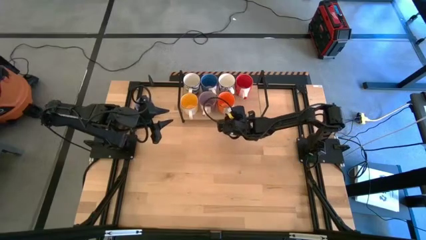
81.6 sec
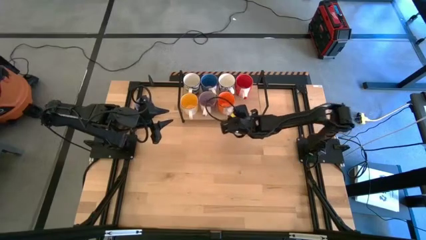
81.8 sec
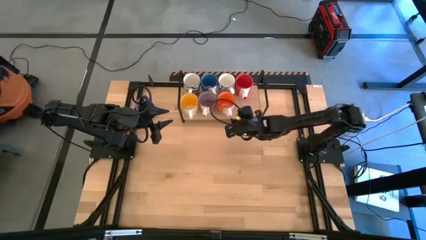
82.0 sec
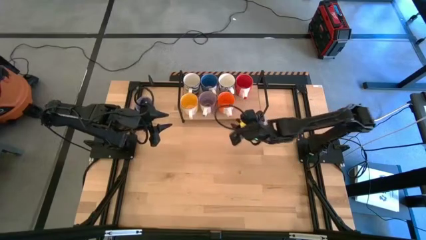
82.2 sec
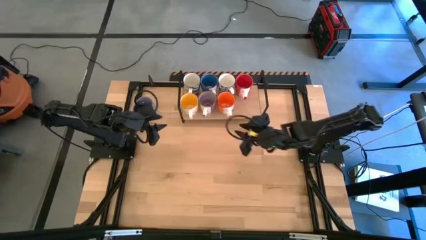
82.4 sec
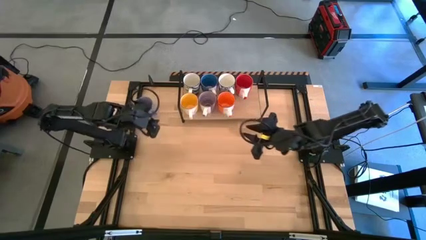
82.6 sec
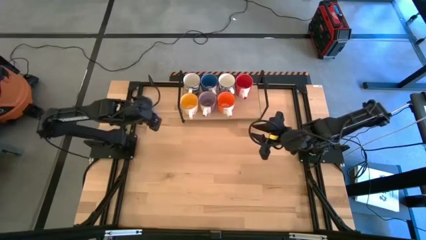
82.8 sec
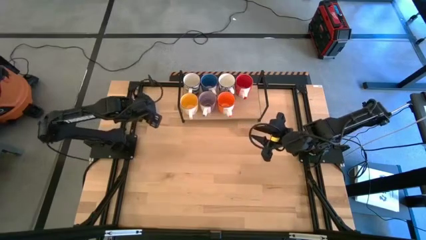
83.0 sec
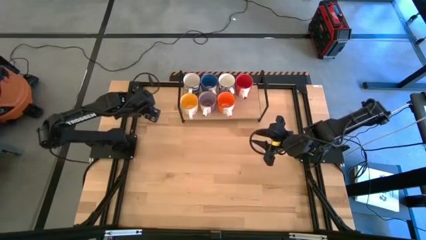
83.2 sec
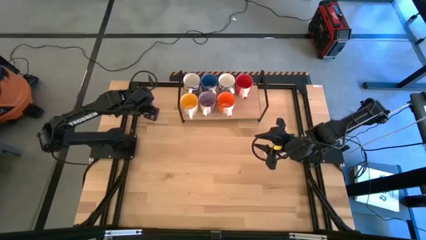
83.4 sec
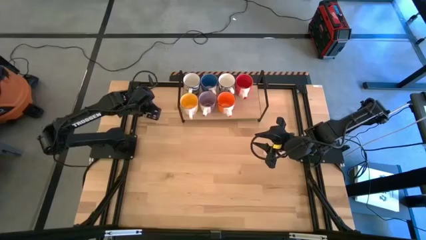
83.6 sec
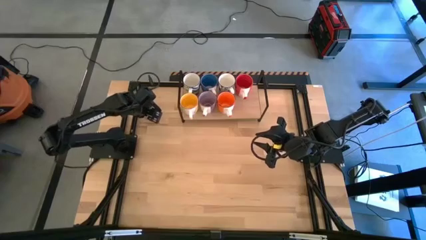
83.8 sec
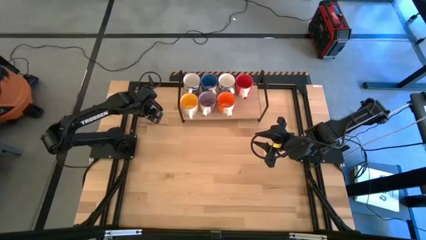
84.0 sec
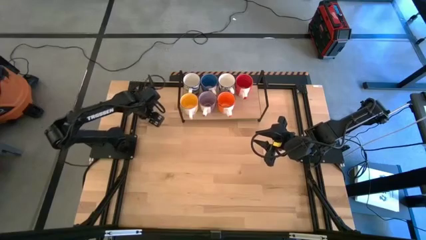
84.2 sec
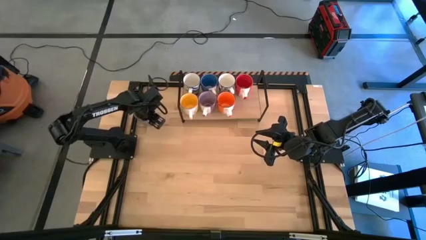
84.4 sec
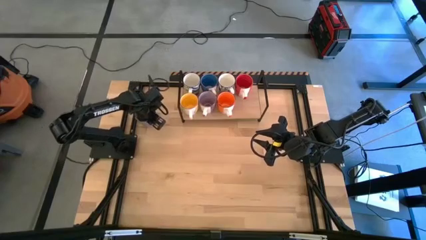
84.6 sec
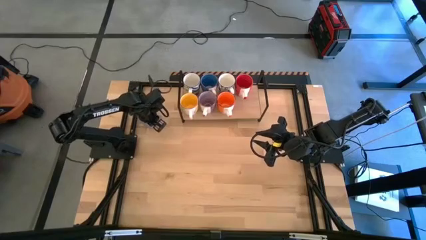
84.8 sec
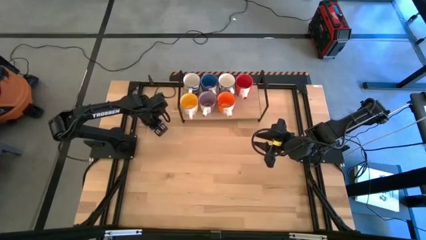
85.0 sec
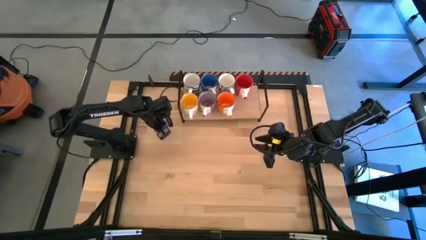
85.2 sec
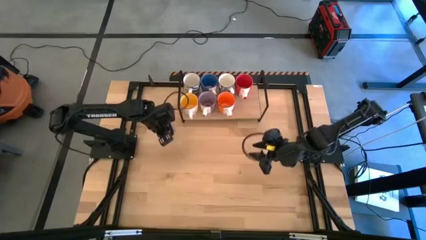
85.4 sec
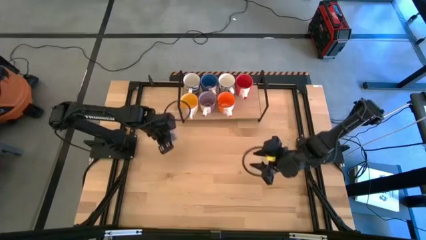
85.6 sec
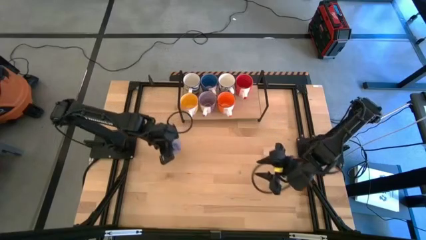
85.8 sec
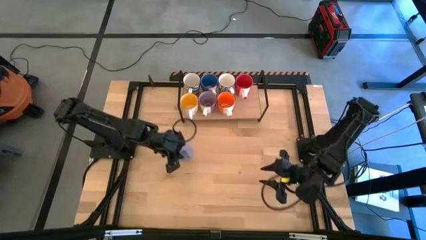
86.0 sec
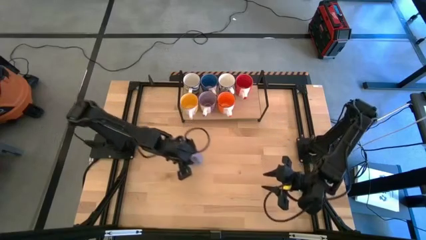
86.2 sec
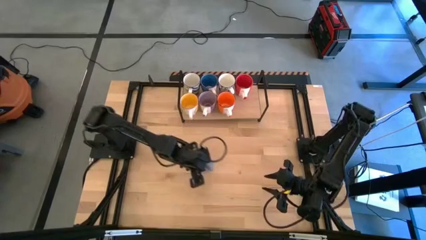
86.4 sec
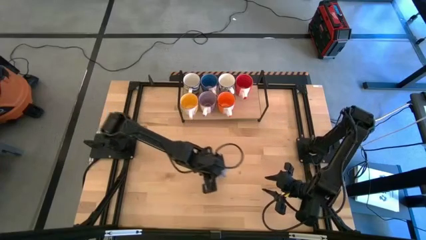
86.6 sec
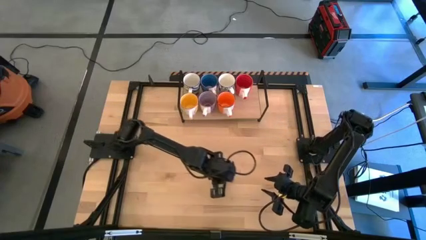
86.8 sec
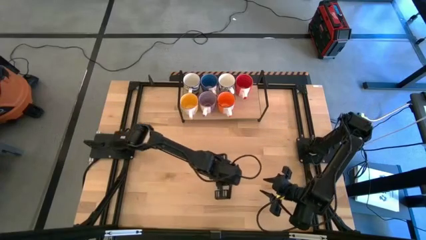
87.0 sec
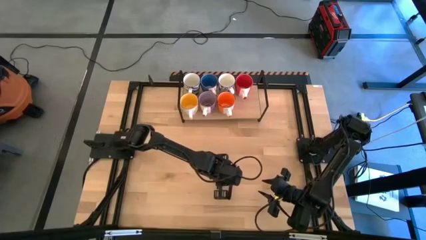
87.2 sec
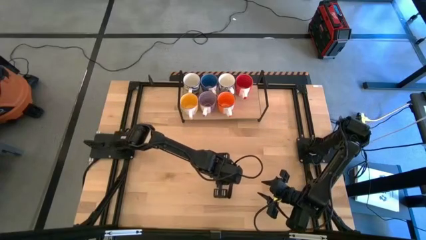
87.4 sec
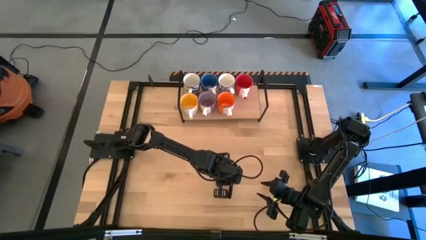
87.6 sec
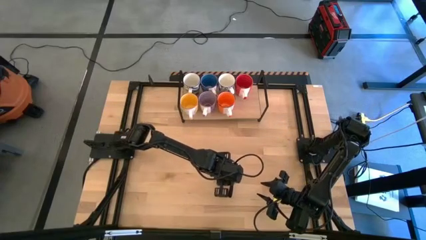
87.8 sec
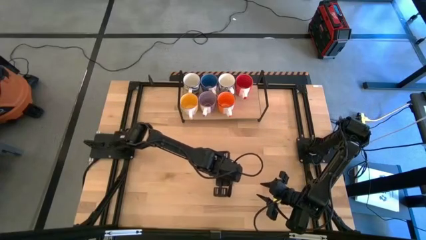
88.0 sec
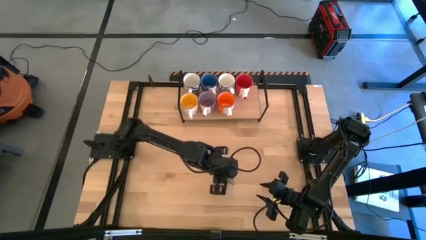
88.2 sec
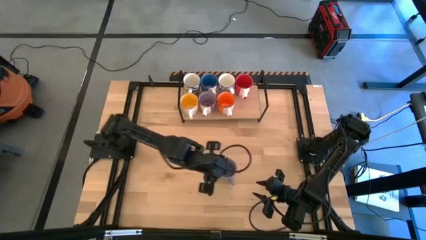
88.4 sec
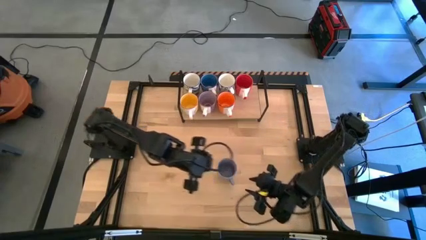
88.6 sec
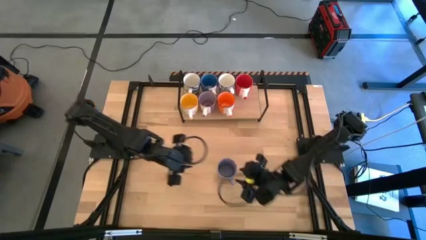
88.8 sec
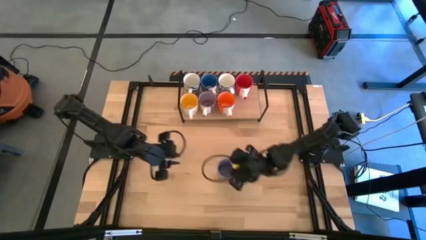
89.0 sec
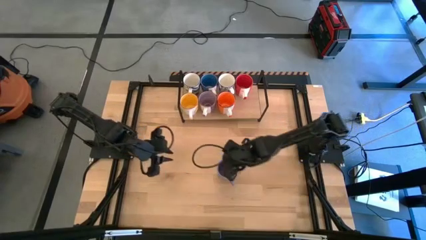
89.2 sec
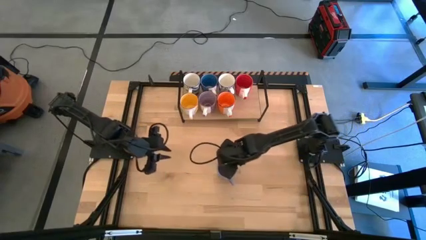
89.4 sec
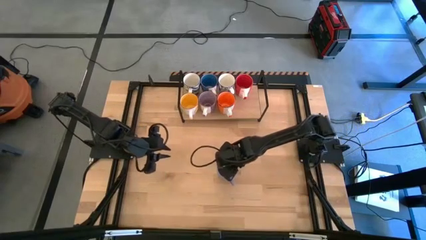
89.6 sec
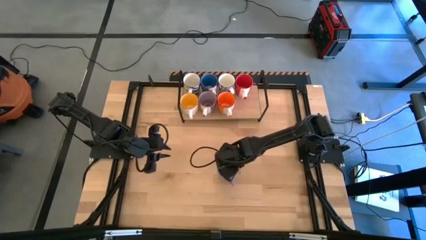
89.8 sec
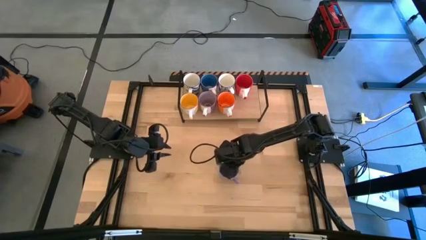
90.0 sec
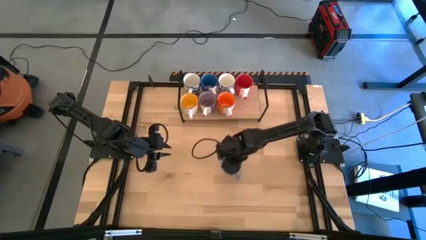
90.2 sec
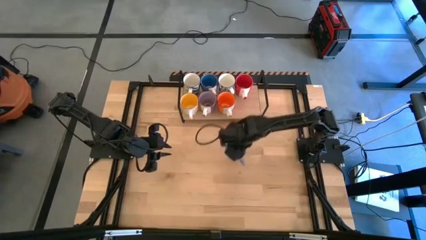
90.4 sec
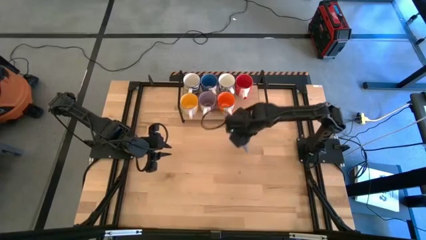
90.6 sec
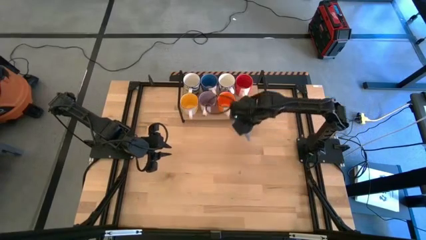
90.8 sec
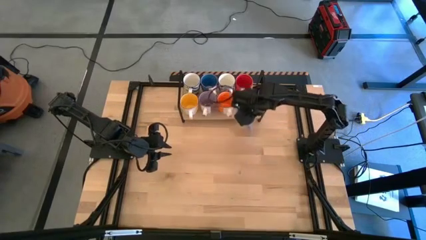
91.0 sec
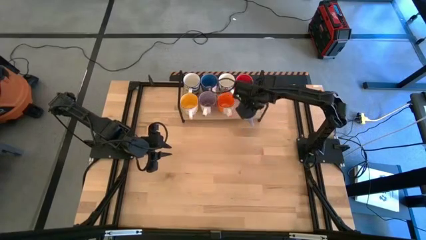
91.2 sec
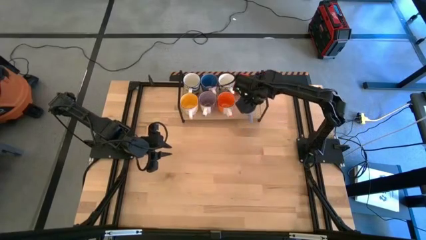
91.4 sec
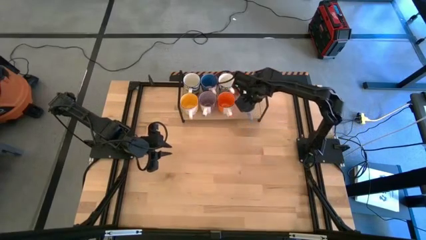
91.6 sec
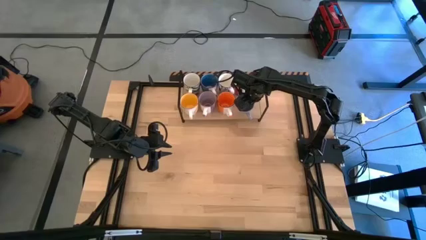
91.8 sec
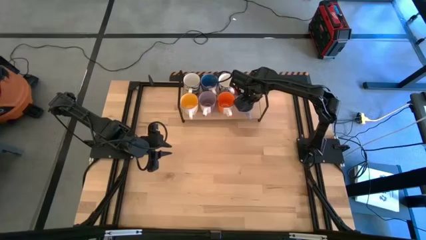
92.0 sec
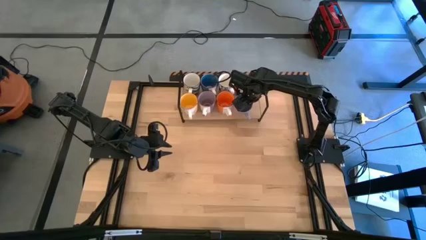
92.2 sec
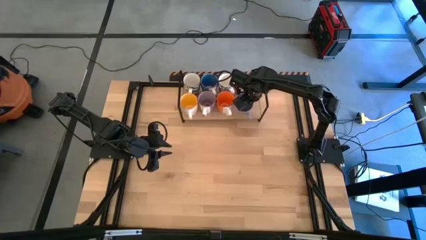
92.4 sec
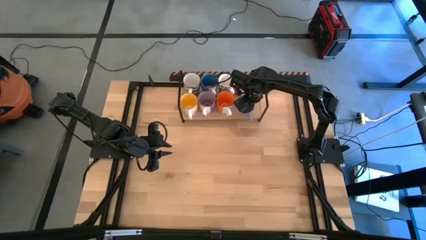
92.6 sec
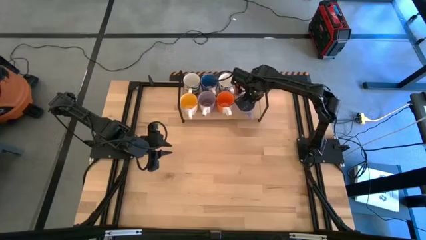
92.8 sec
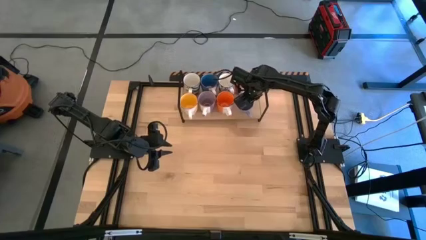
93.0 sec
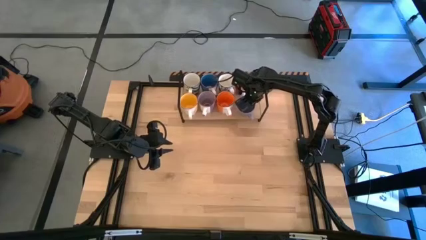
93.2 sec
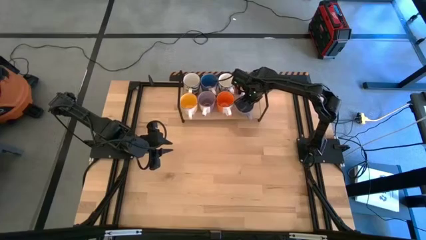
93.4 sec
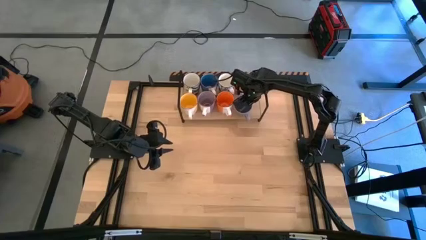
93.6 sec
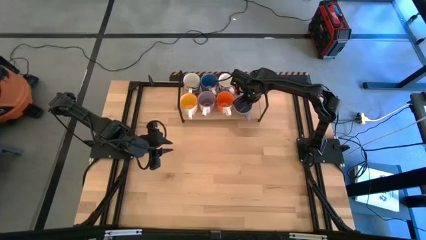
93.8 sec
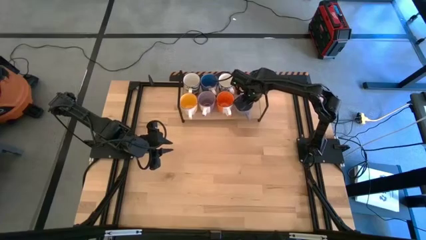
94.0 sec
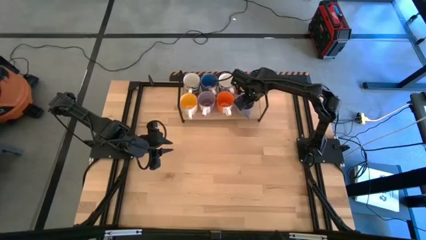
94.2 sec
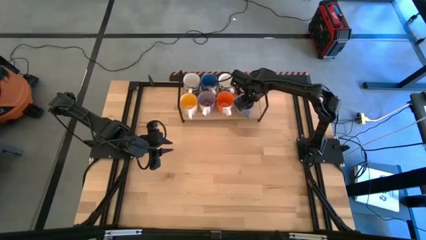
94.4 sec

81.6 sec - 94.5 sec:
Task: Place coffee mugs
Put the purple mug on the shelf

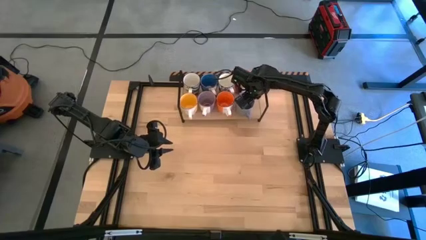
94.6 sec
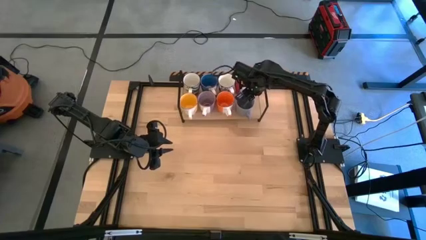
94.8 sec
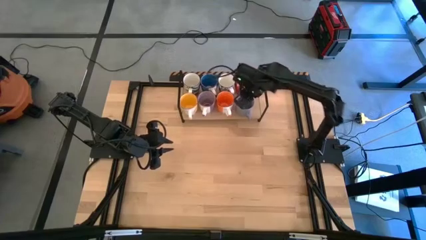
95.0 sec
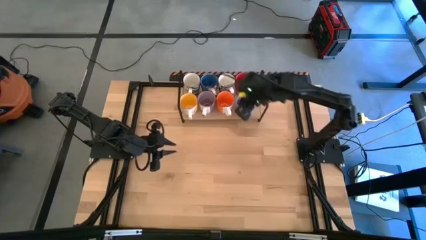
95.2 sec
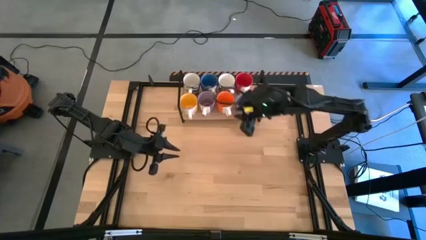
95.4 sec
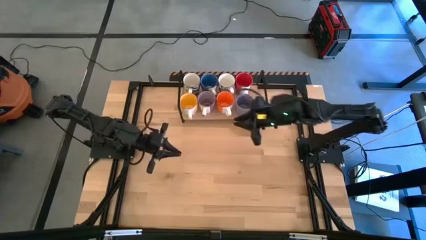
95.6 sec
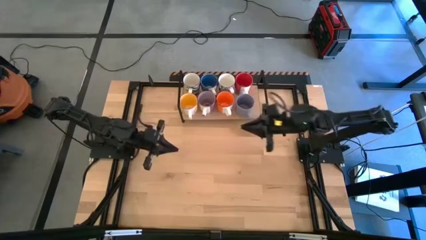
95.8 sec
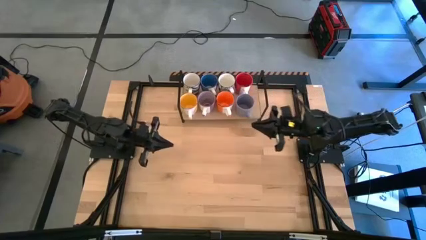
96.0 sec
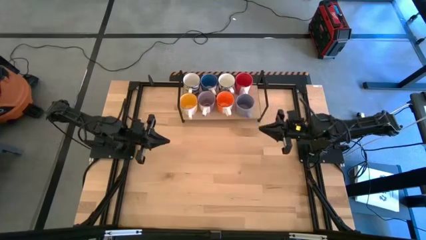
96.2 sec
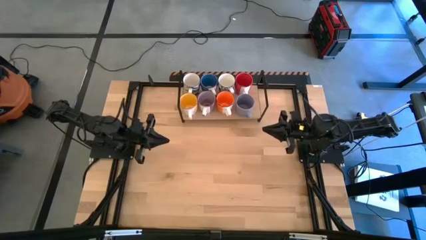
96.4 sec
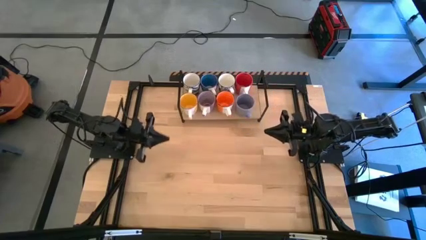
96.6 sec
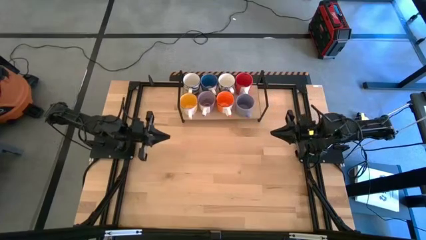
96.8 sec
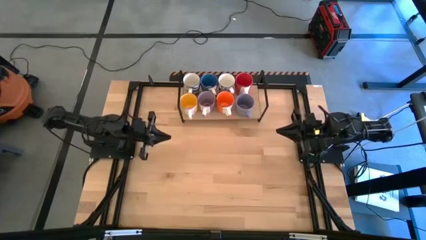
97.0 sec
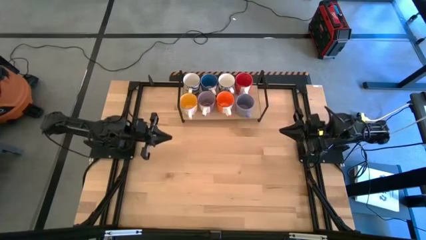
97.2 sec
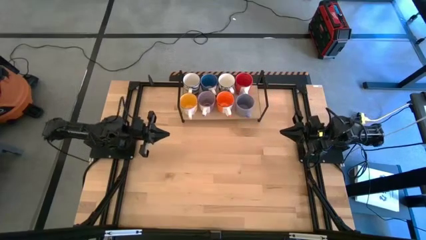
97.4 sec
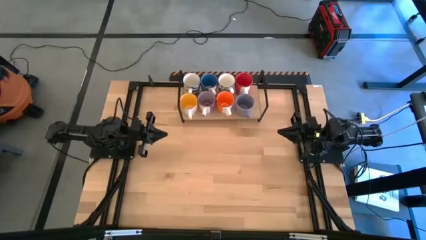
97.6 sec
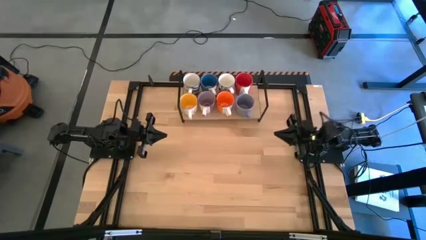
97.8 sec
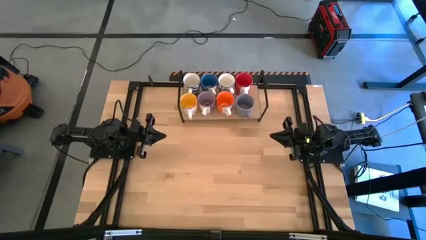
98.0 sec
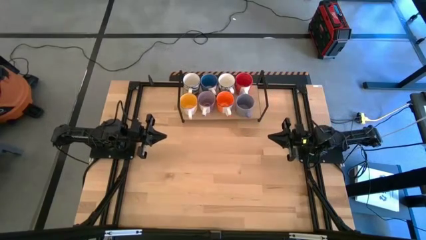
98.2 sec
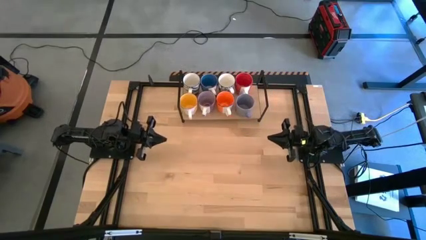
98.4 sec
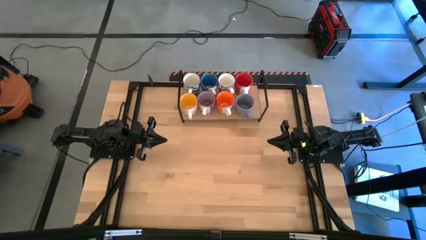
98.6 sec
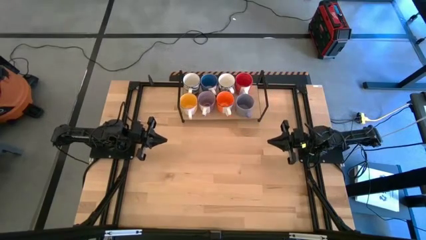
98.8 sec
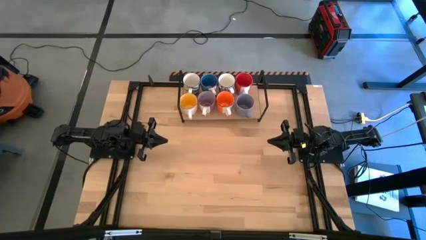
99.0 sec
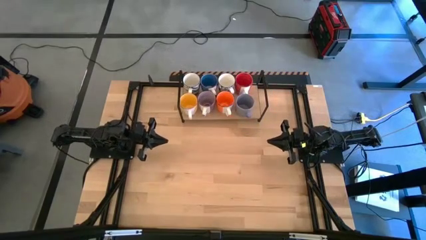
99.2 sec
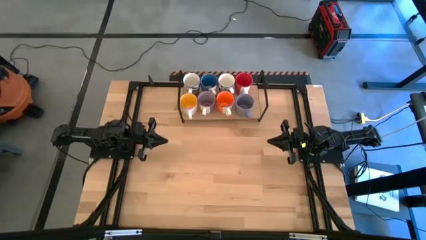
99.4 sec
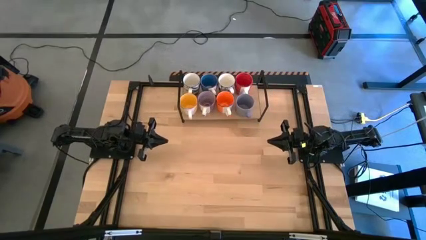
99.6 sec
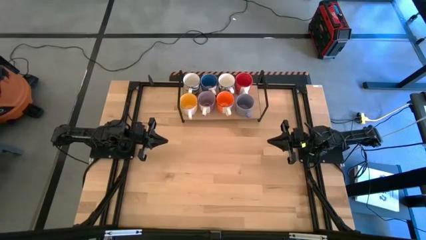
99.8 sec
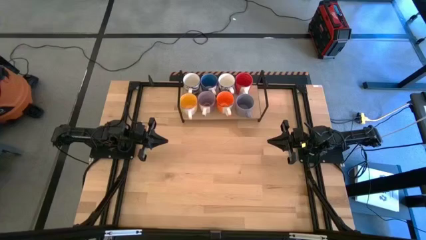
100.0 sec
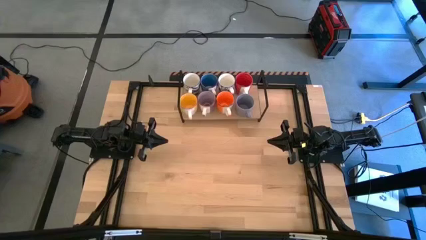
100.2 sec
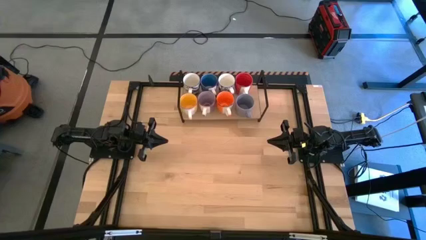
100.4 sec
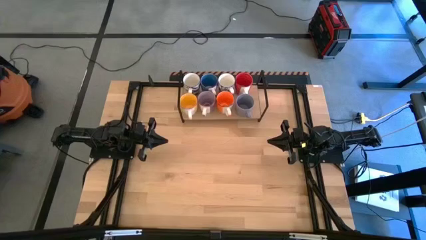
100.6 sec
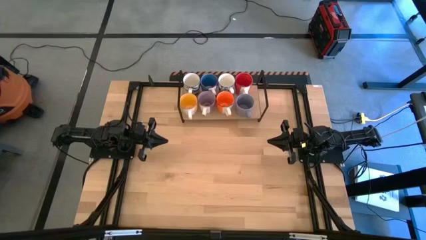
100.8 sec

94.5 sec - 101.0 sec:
Return to Home Position
